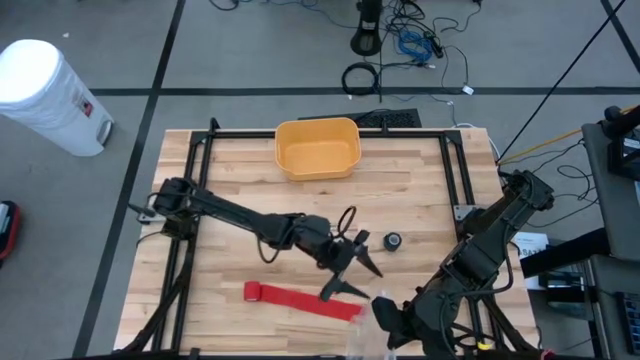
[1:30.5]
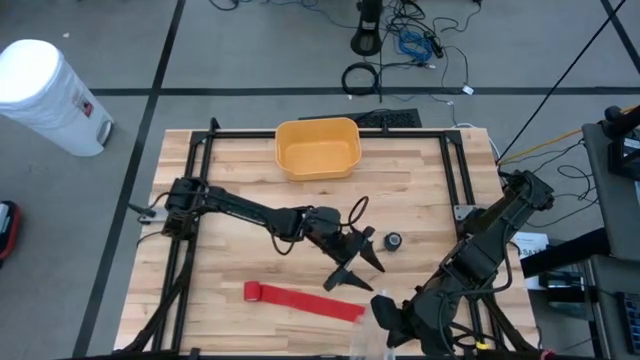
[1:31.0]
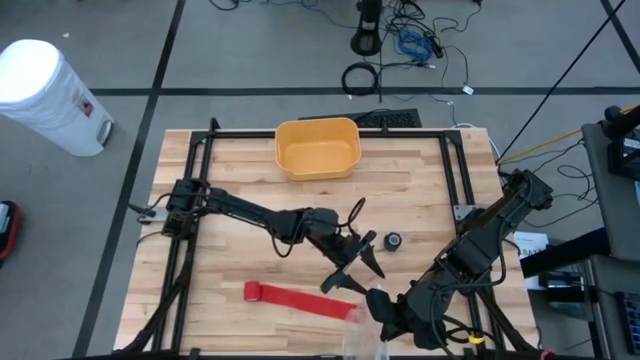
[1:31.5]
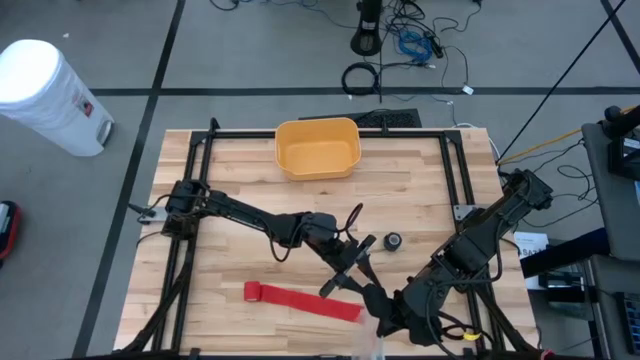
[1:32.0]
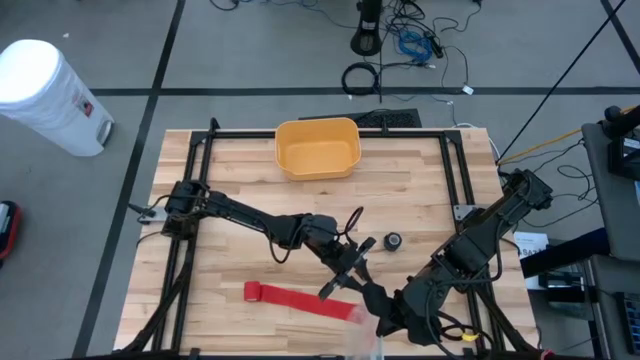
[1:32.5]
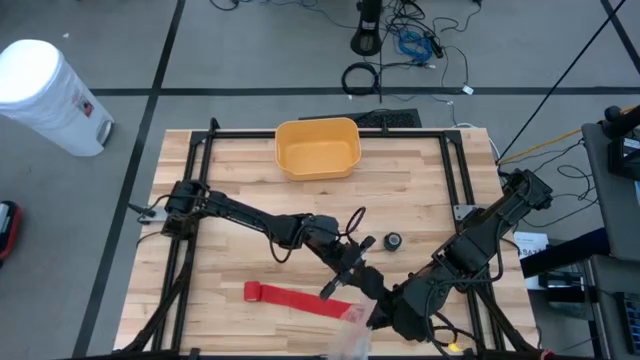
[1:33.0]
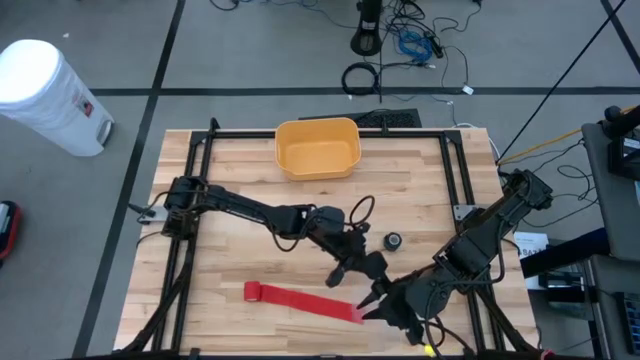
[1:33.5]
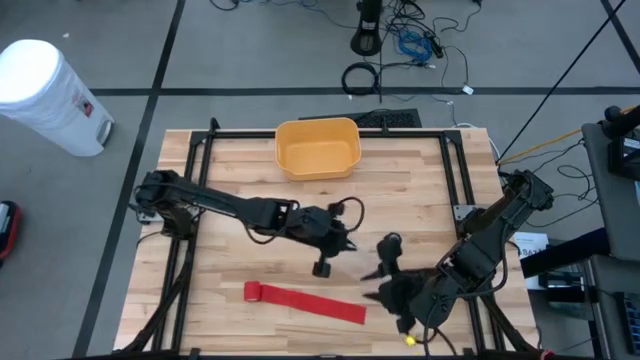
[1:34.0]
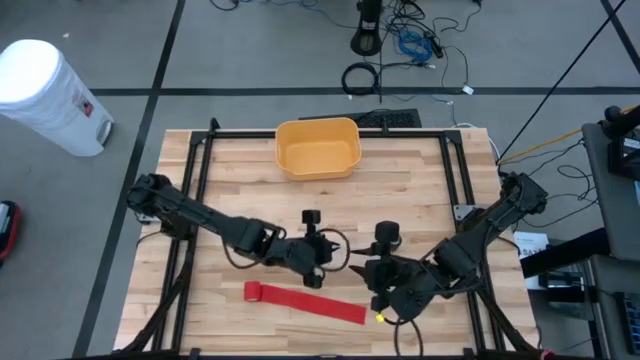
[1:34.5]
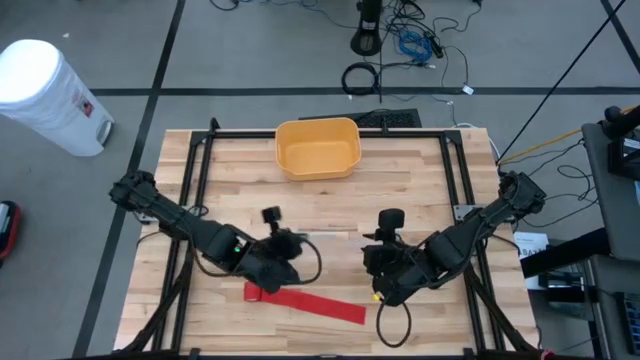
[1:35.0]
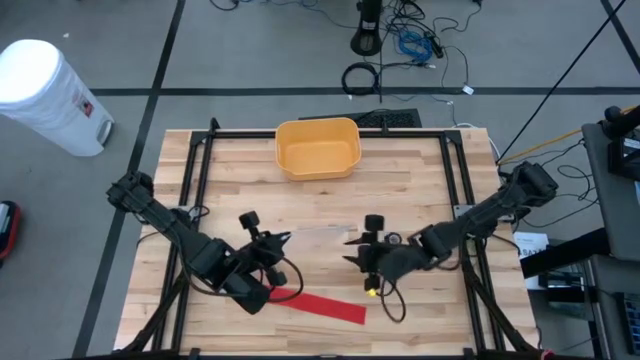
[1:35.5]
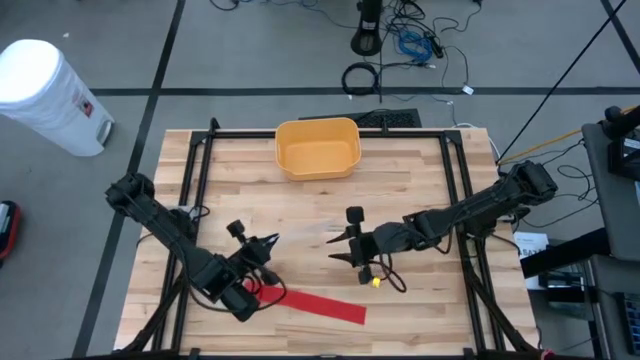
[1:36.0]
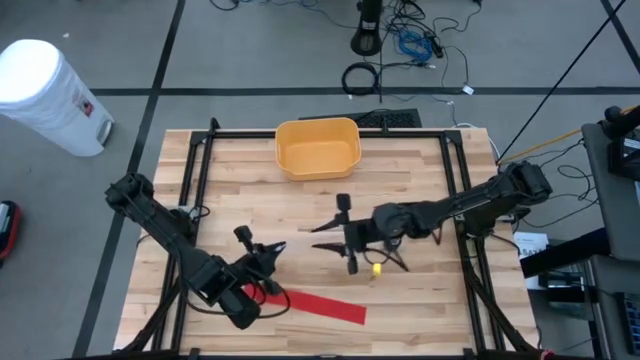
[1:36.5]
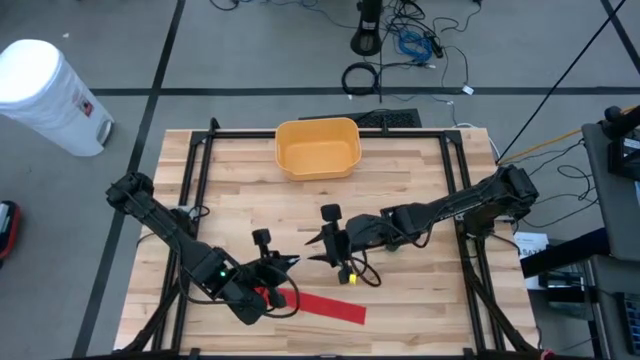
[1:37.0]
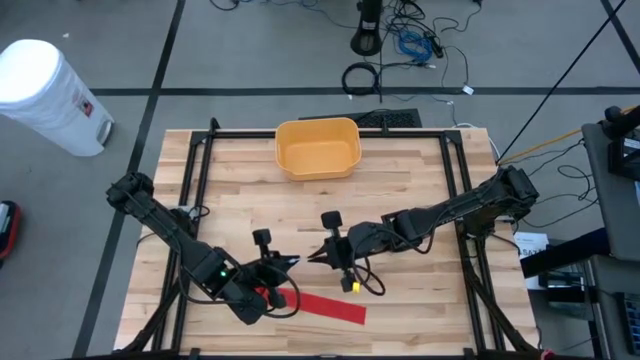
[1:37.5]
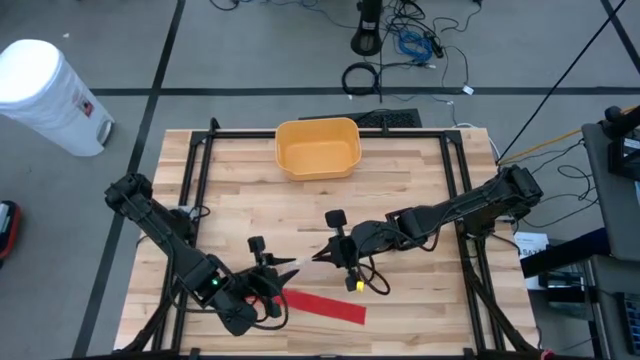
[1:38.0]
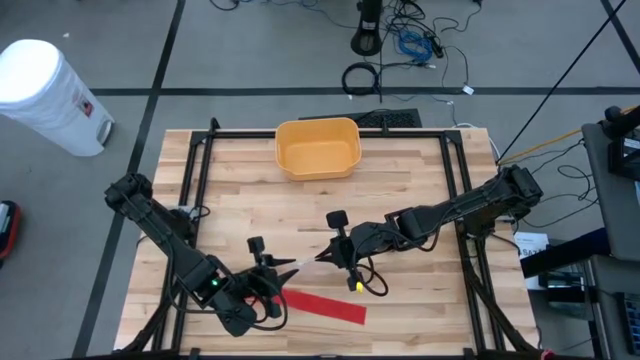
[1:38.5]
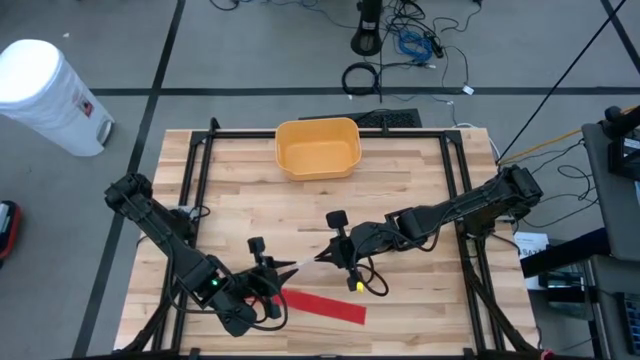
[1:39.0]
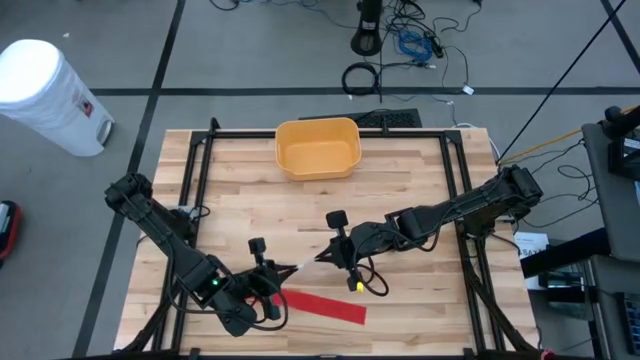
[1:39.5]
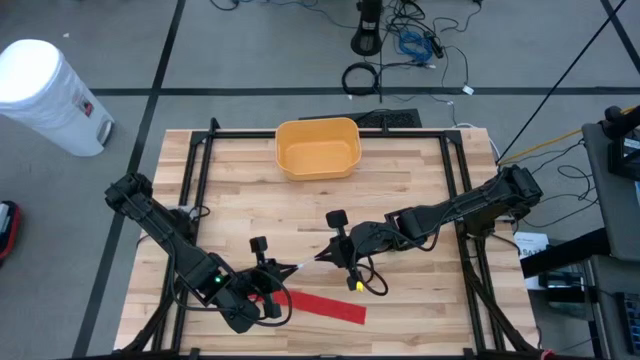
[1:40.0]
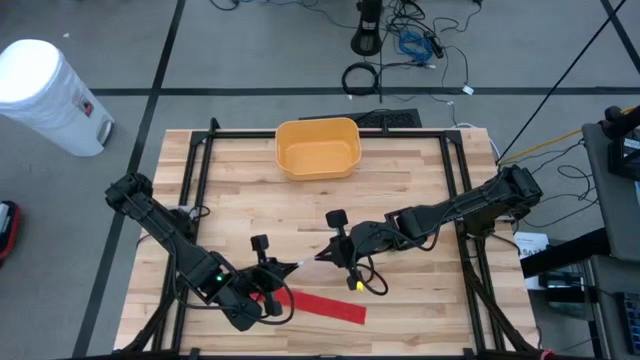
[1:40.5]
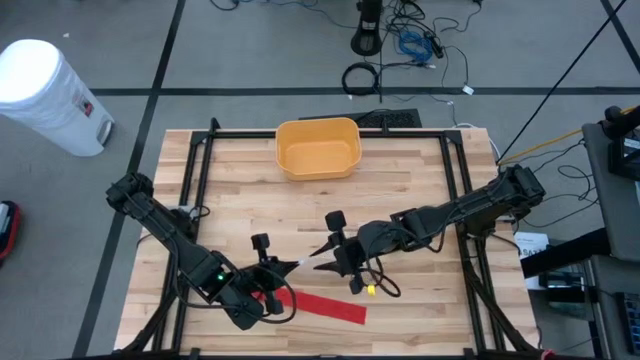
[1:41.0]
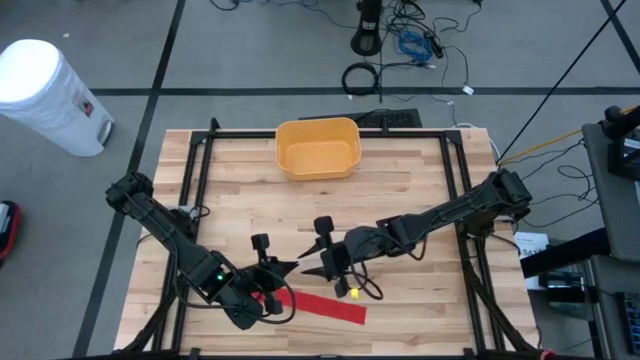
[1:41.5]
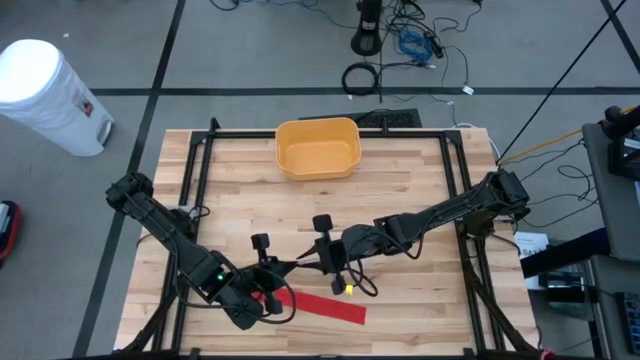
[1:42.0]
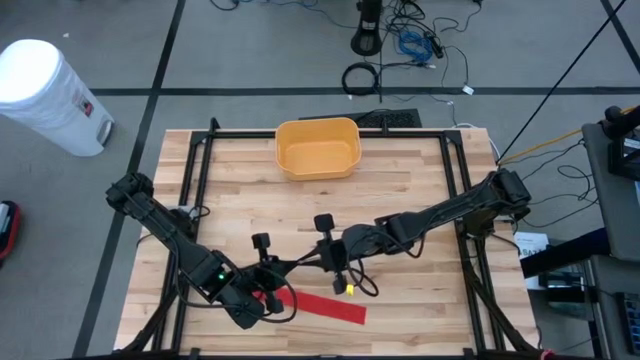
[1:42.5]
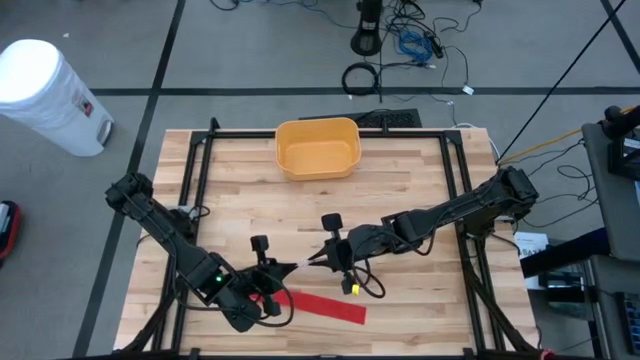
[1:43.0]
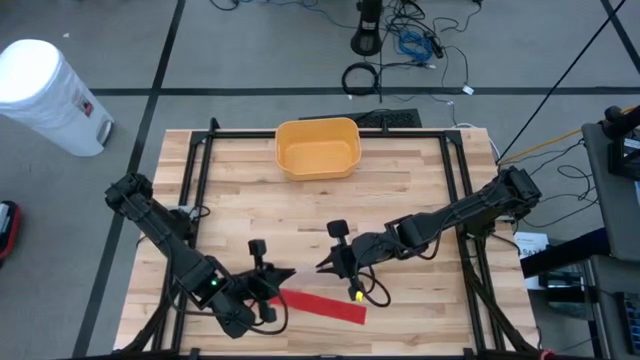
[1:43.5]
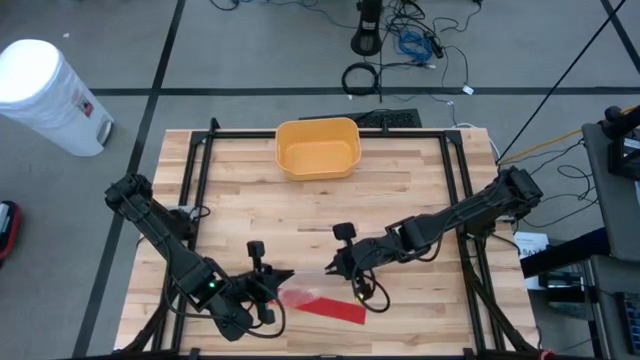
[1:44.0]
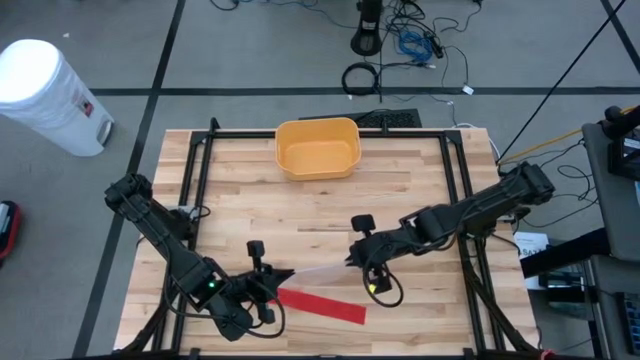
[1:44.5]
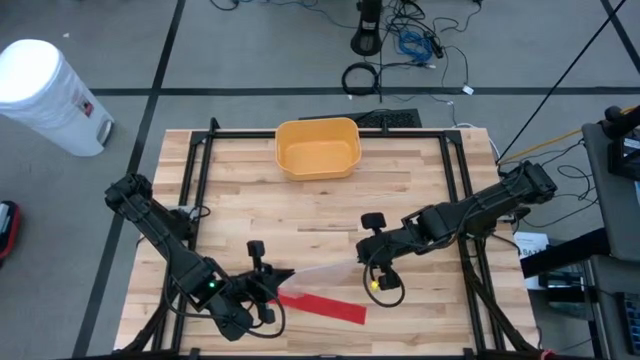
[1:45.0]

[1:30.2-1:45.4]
Task: Roll bandage
Open the transparent zip bag

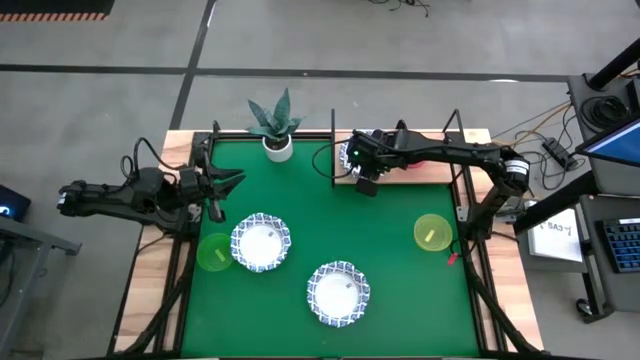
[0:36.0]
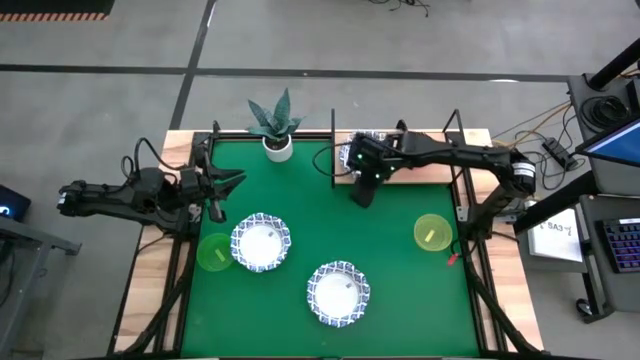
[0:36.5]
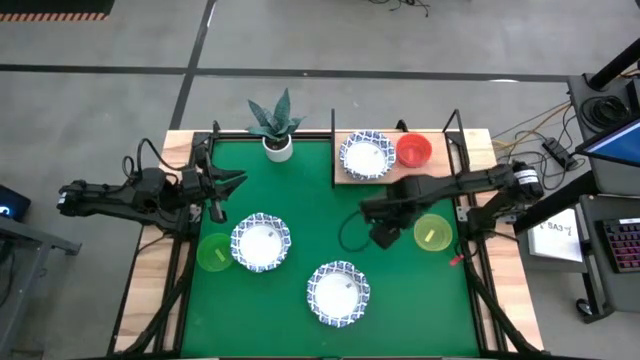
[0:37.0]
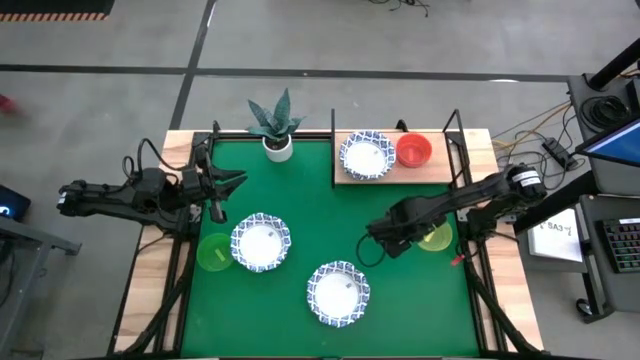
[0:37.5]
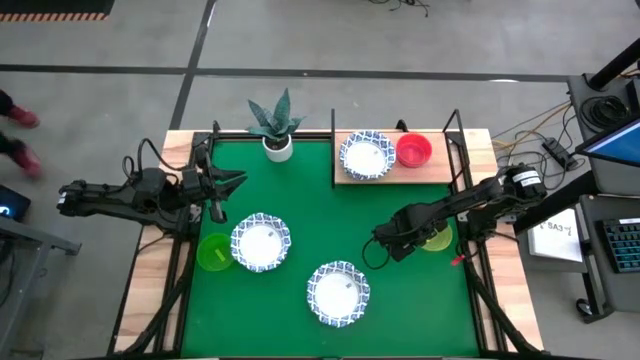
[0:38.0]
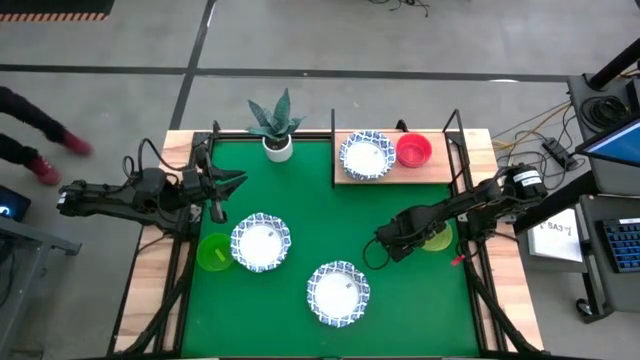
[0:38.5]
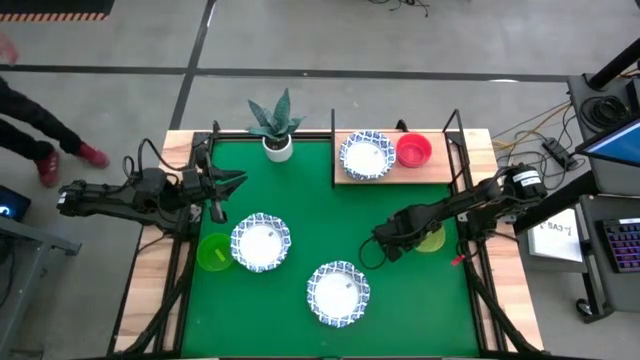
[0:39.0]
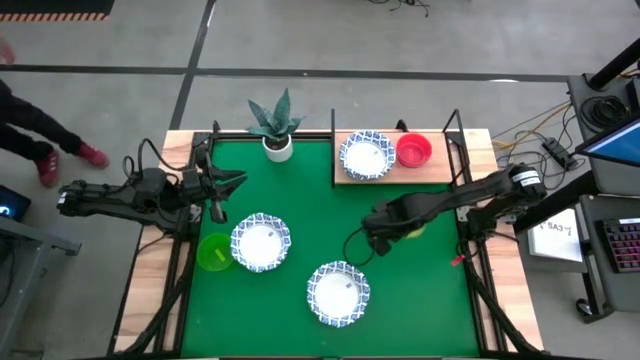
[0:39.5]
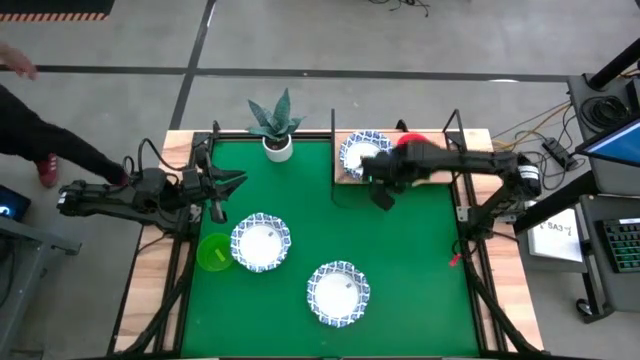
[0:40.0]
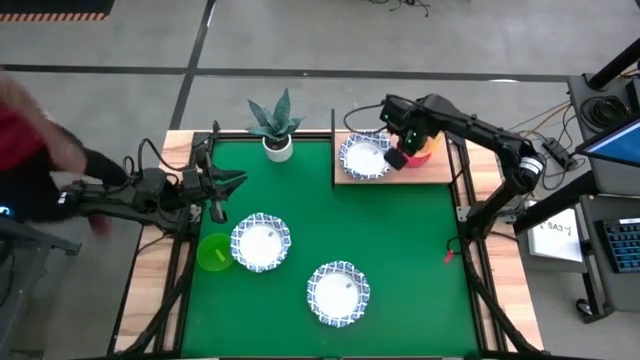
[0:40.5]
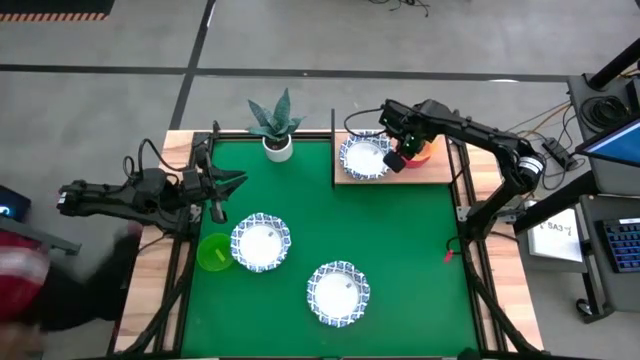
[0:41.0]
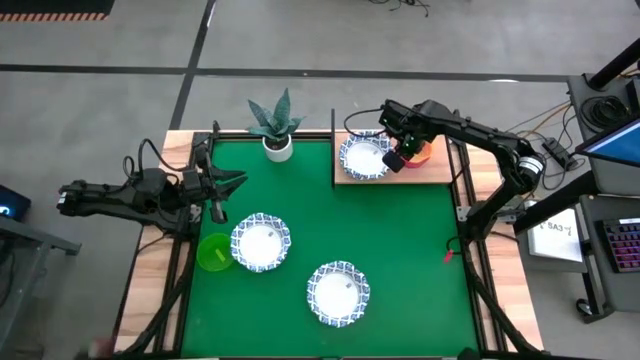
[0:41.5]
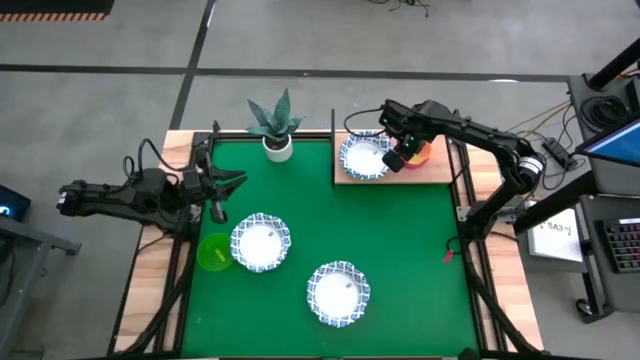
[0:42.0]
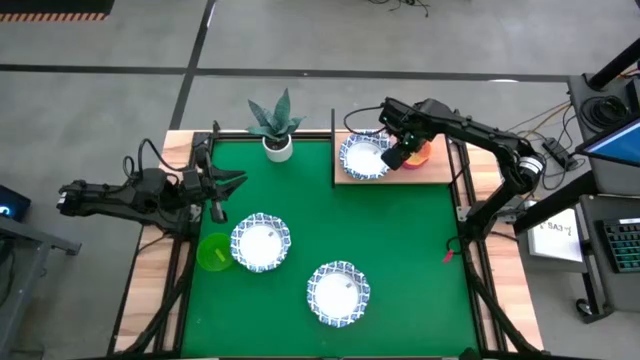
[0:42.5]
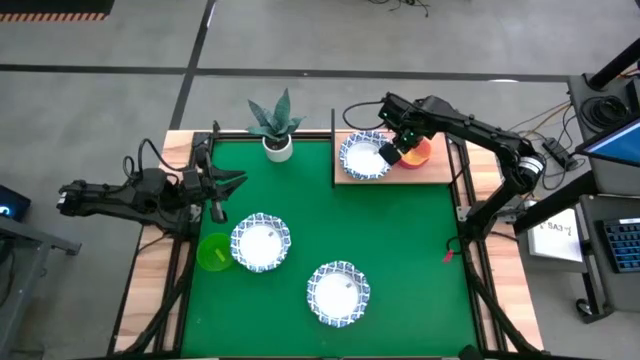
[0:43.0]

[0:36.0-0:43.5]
Task: Place and stack bowls onto a shelf
Stack the yellow bowl on top of the orange bowl on the shelf
